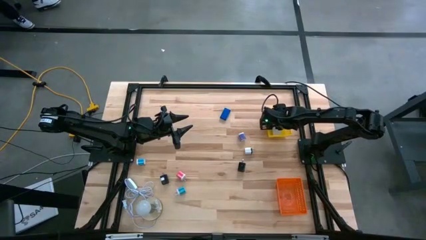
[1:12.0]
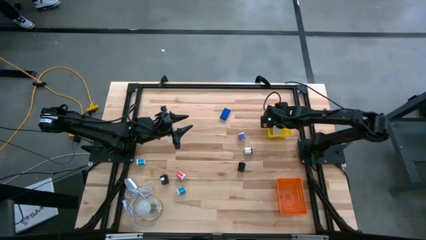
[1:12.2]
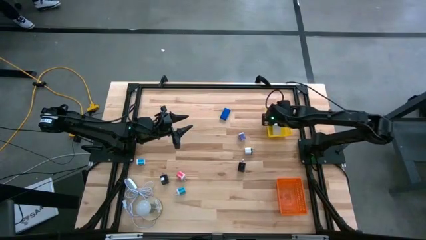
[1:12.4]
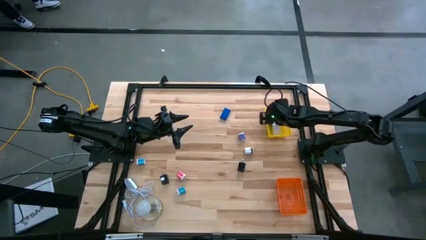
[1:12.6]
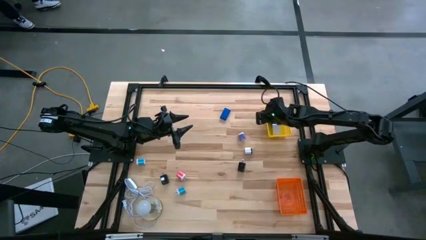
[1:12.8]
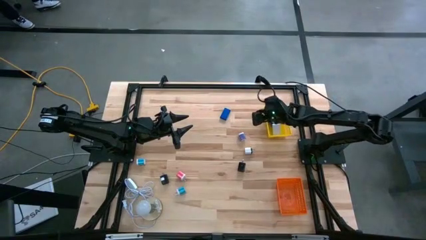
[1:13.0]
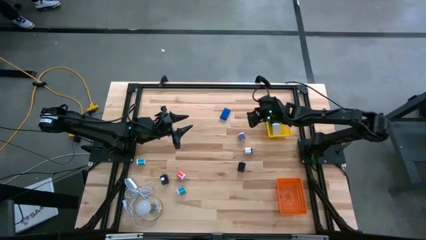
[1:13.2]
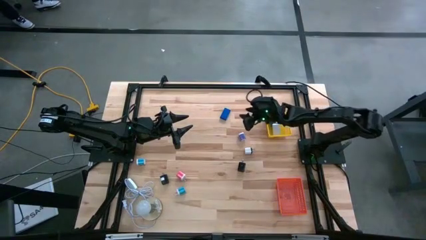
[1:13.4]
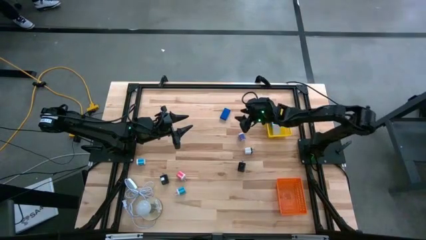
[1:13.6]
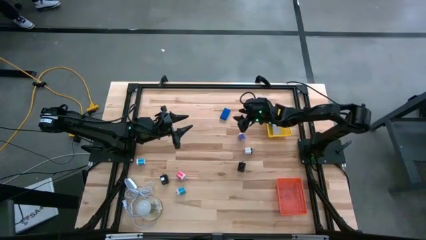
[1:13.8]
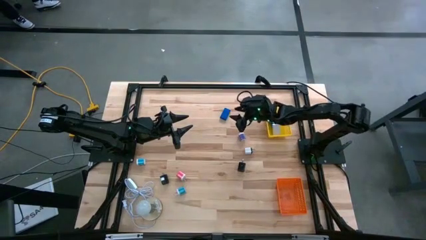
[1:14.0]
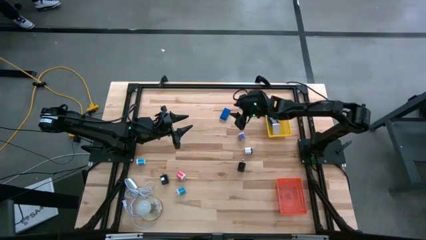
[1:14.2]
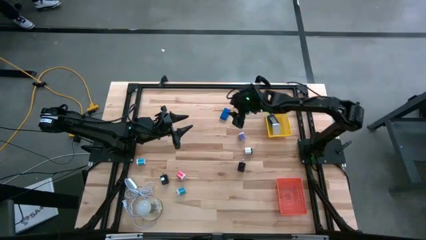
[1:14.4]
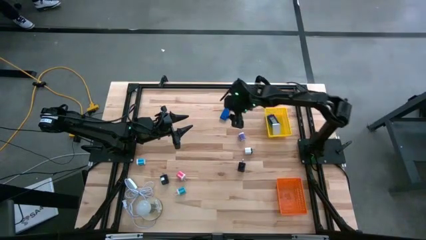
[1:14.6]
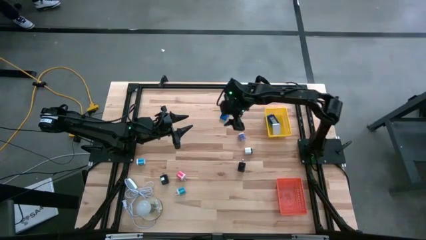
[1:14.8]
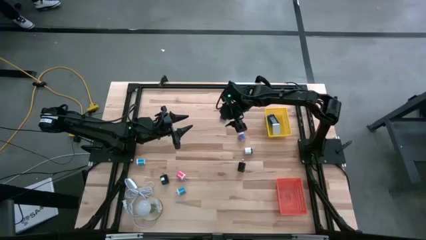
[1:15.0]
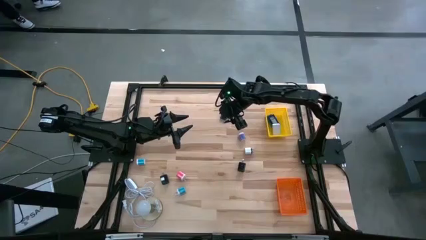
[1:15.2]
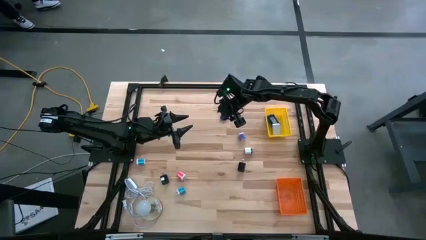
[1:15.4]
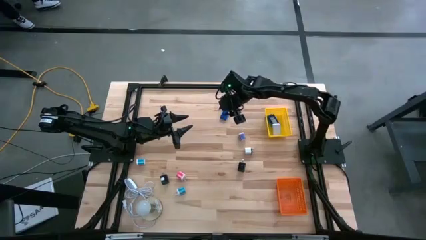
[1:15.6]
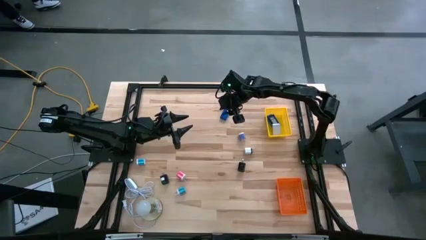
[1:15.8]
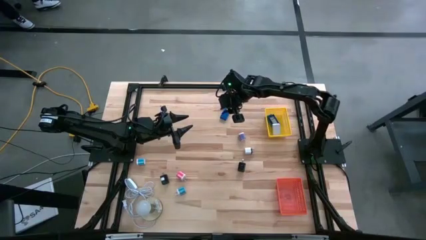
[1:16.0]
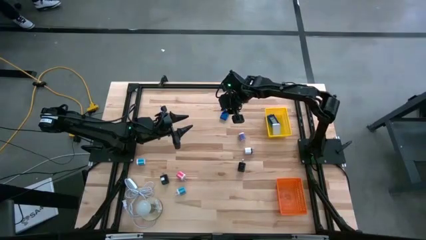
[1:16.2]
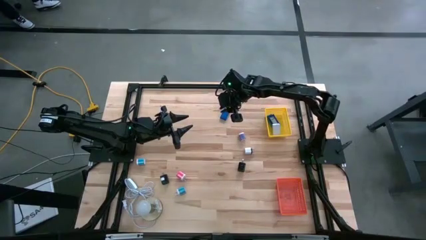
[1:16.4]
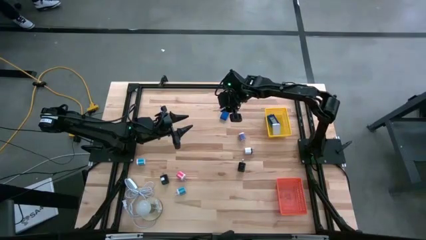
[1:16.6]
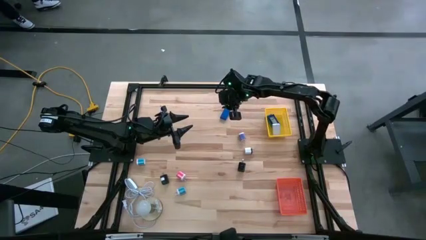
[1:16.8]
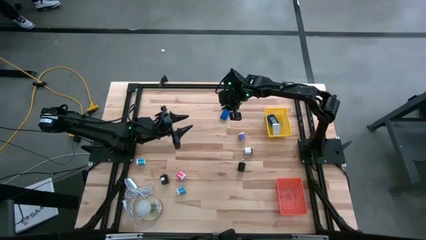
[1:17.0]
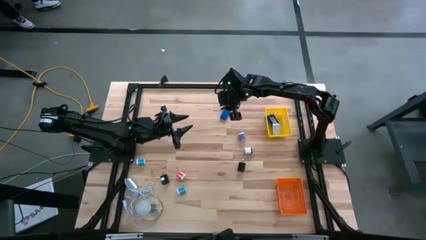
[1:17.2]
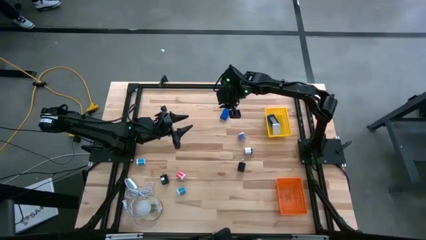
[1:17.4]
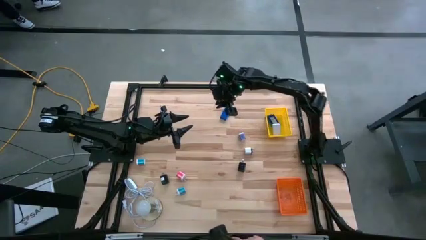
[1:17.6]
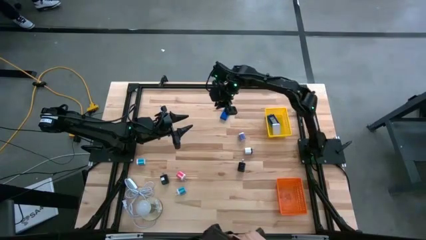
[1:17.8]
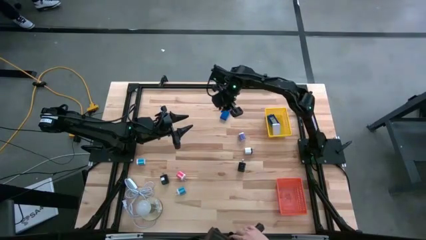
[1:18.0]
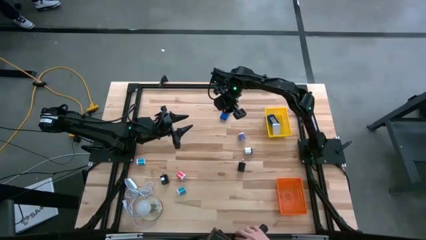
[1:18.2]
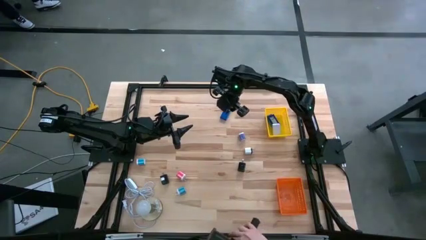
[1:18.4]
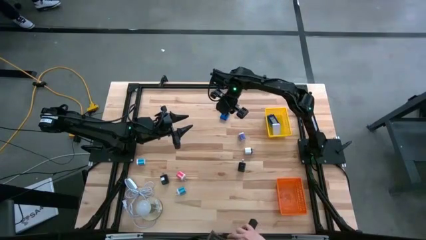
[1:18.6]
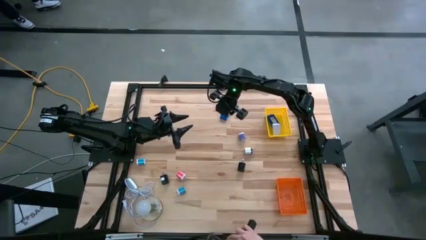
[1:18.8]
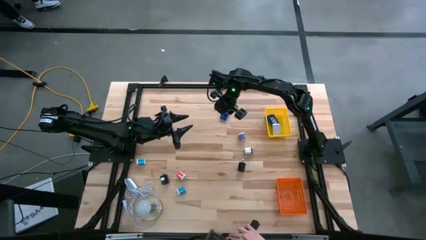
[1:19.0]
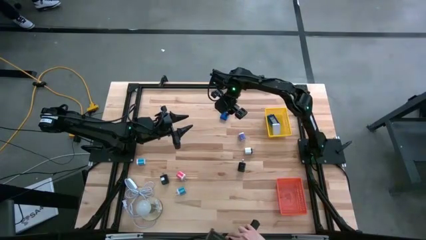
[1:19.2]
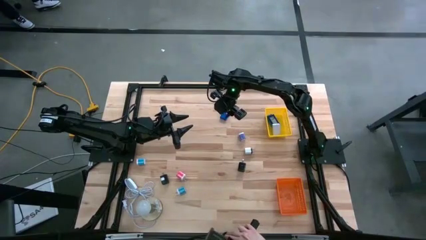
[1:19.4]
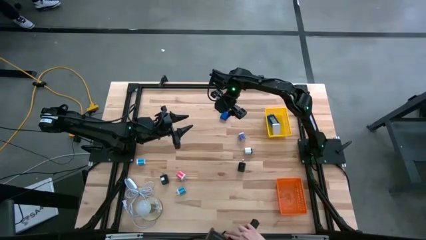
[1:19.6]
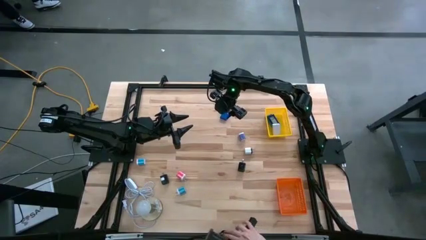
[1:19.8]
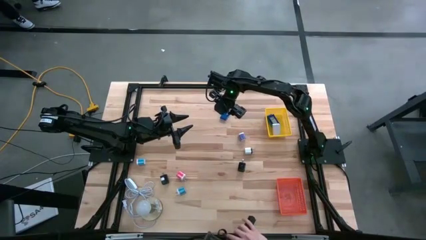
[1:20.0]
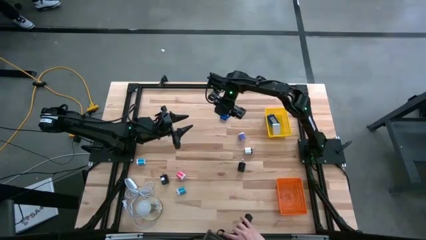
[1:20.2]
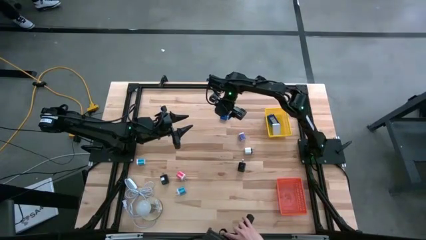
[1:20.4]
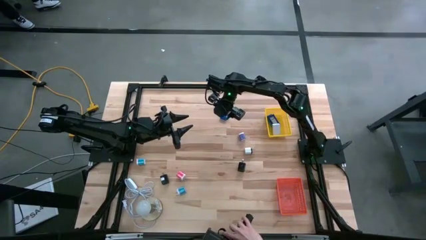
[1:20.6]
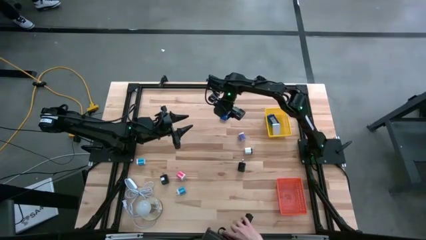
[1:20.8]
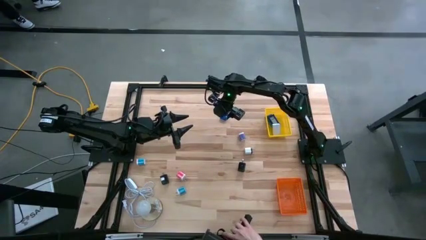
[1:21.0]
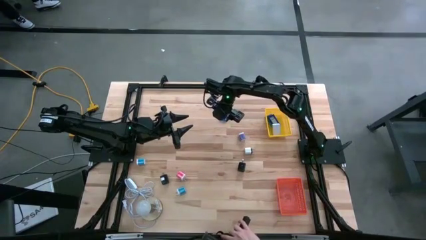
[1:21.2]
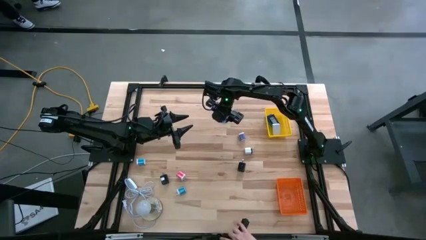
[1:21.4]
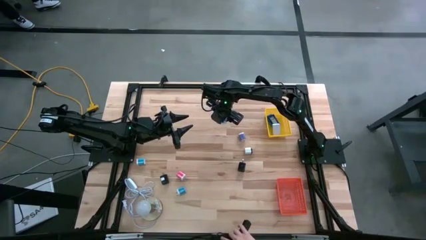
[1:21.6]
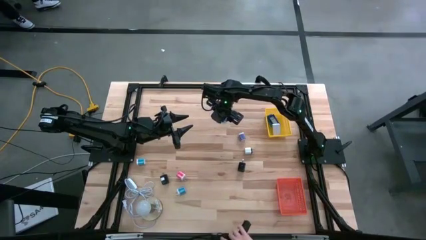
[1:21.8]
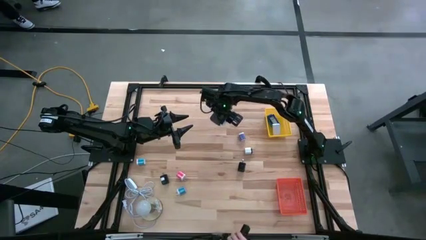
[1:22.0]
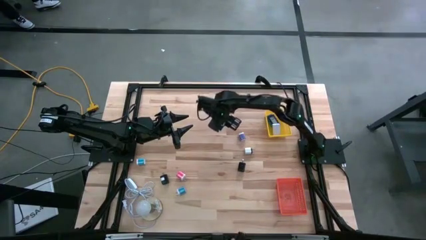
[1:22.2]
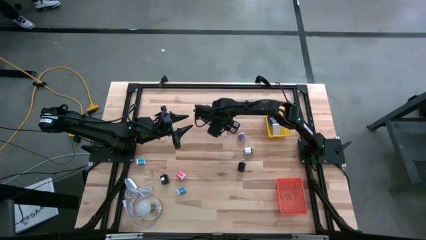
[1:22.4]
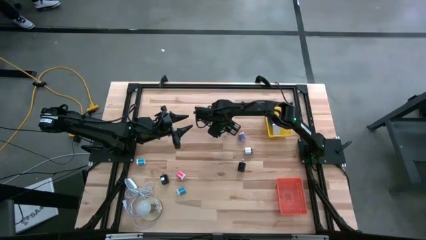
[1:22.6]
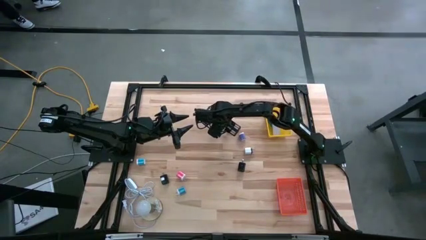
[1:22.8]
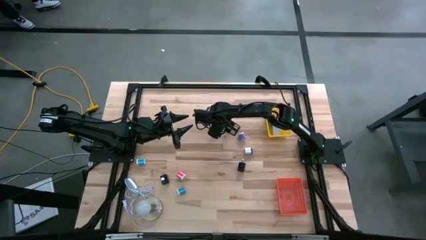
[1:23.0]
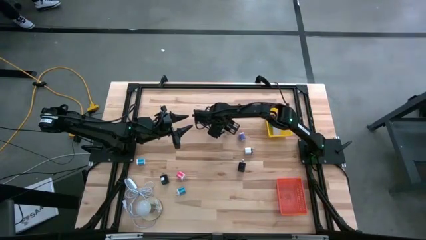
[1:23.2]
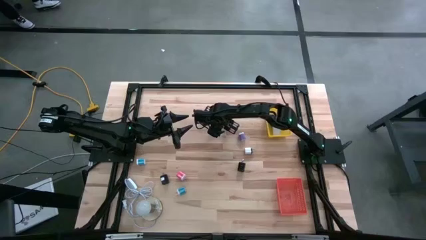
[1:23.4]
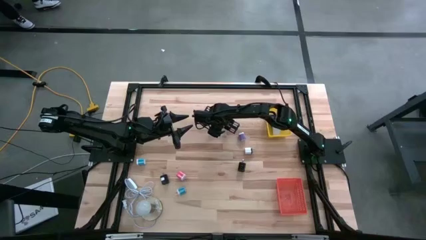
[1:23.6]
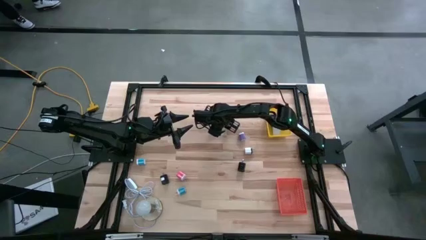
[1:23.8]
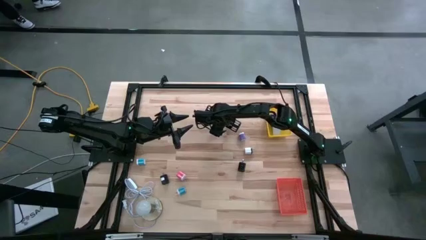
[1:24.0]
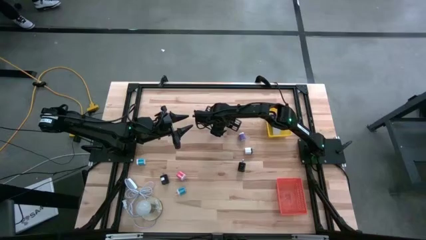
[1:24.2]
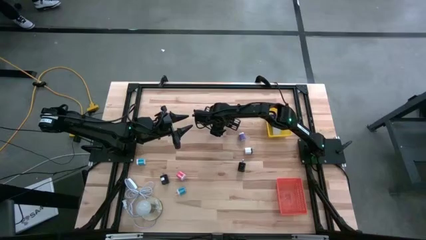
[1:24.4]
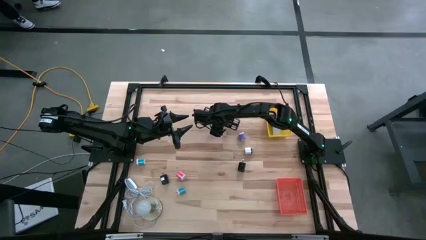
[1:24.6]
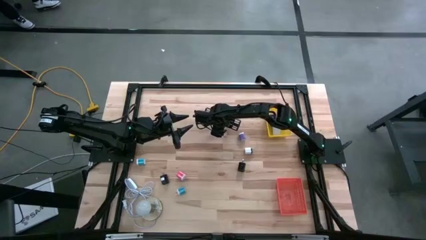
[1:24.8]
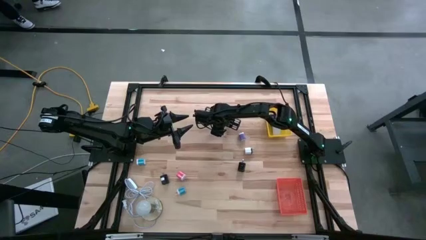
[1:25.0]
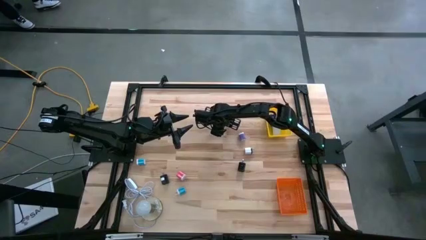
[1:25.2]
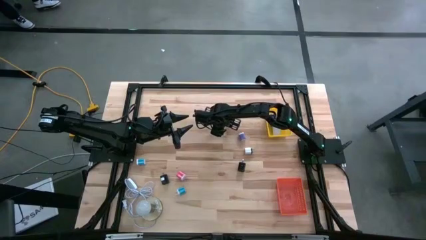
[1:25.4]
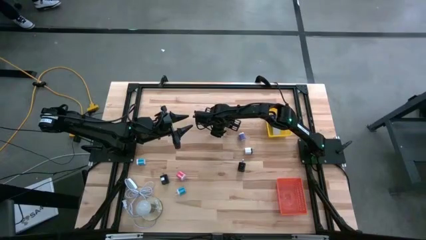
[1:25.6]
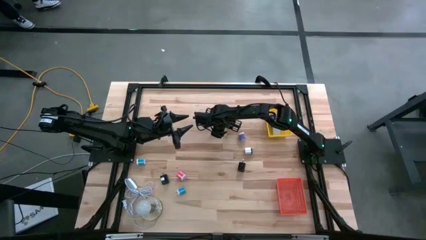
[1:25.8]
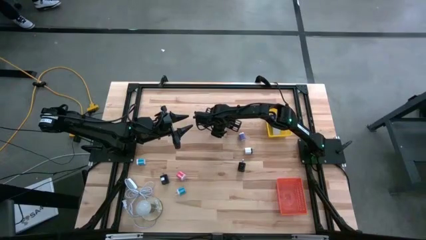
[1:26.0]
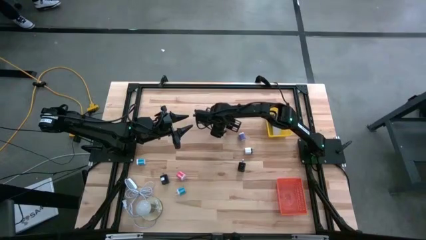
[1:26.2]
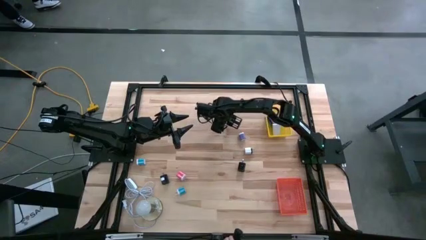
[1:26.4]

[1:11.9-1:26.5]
Task: Pick & Place Office items
Put the blue digital clock into the yellow bin

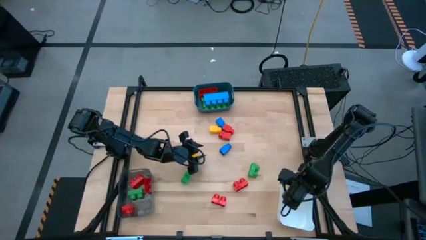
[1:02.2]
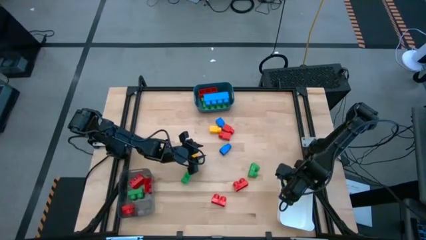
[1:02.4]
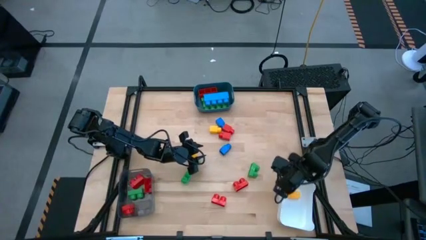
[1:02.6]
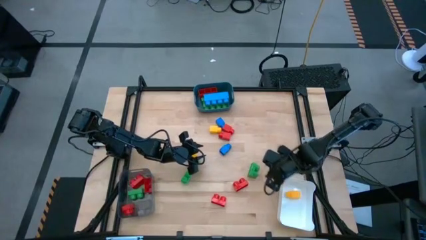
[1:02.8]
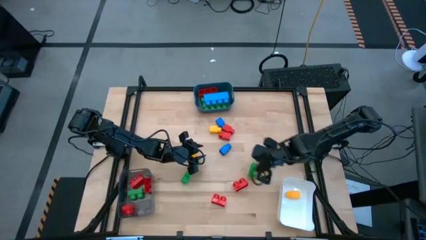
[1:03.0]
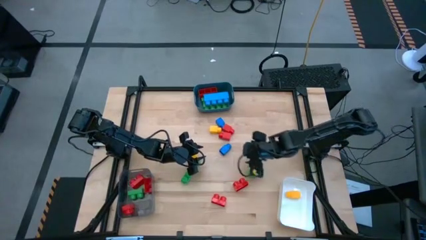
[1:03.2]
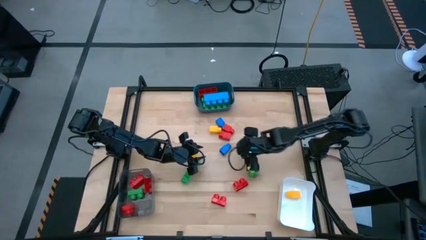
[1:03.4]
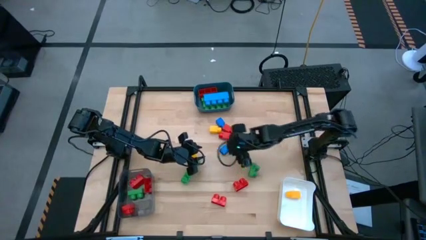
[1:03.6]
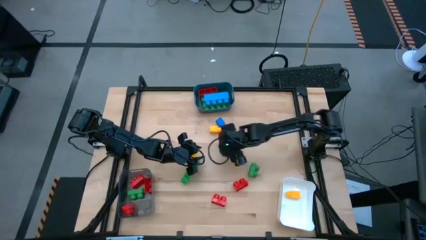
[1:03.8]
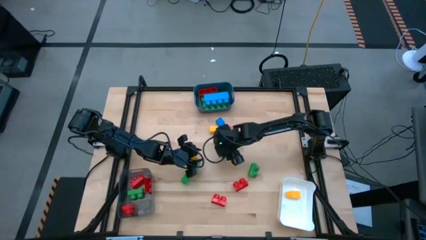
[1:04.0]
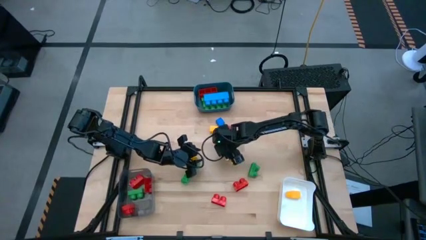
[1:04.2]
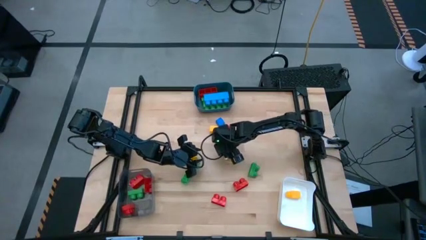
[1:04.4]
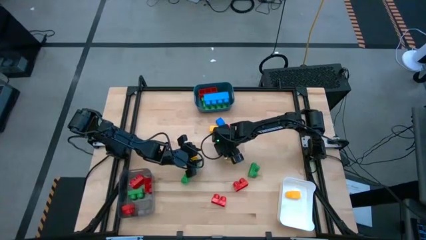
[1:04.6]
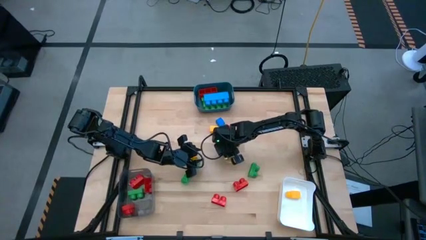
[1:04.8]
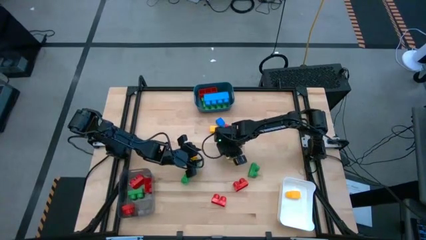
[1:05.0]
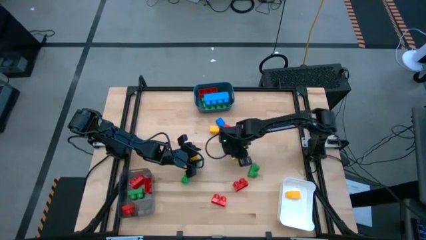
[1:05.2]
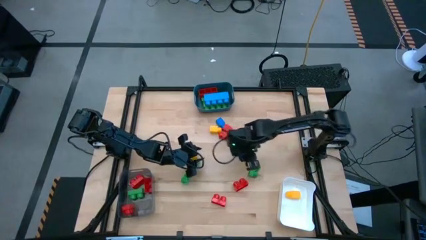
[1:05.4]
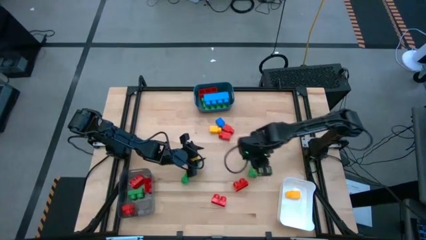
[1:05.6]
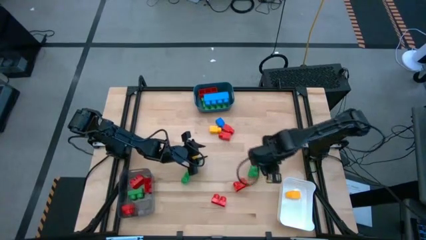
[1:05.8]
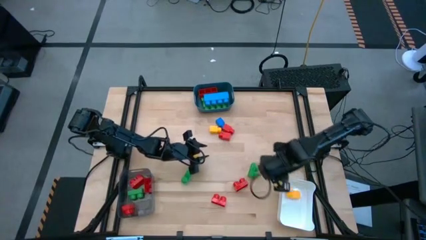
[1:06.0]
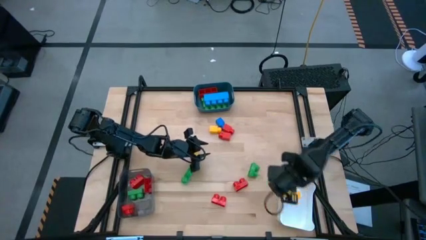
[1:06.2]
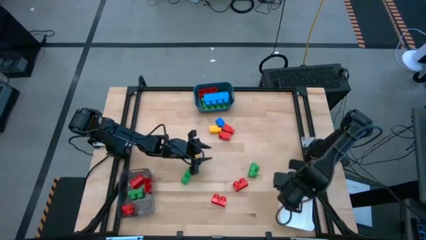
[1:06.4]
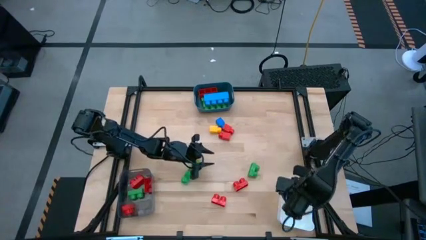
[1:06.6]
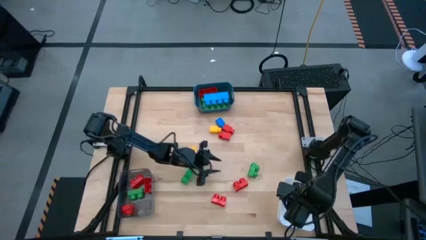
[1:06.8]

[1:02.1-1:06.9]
Task: Sort blocks by size
Put the blue game piece into the white container
